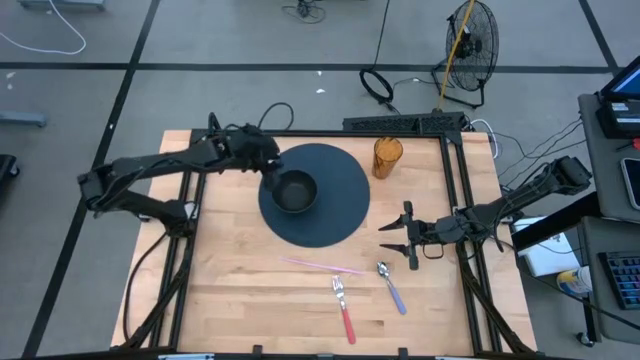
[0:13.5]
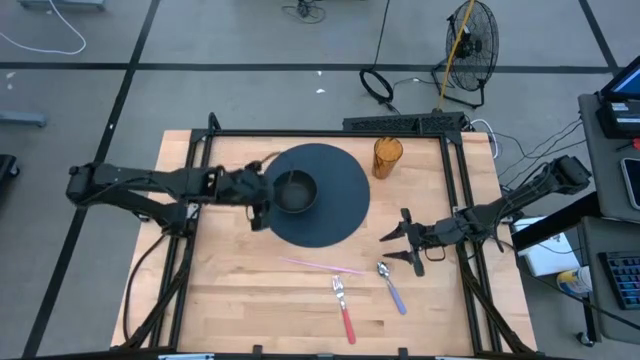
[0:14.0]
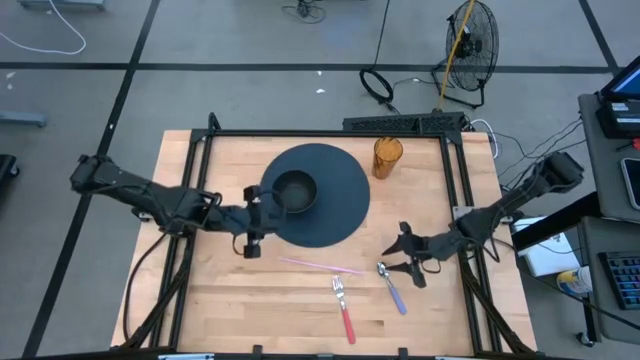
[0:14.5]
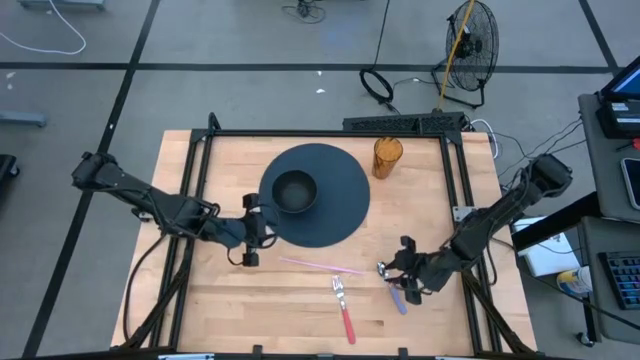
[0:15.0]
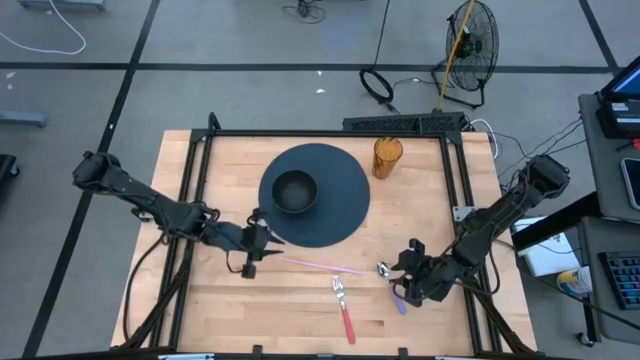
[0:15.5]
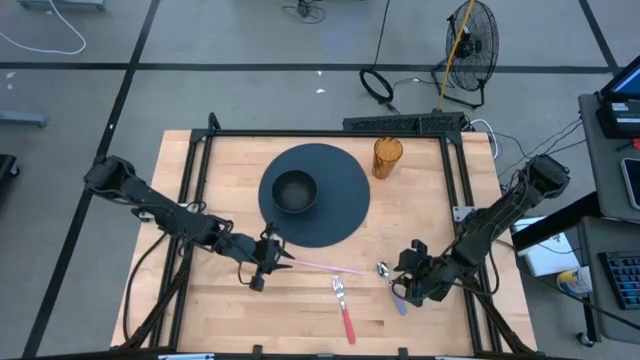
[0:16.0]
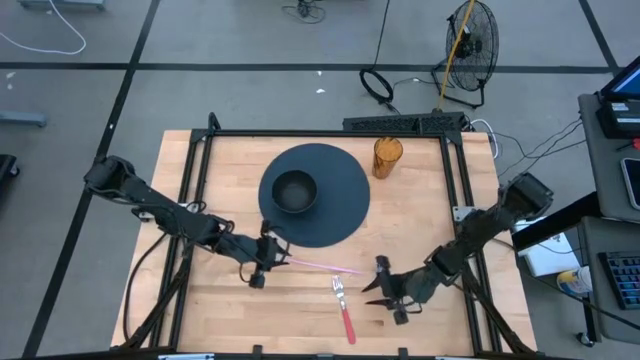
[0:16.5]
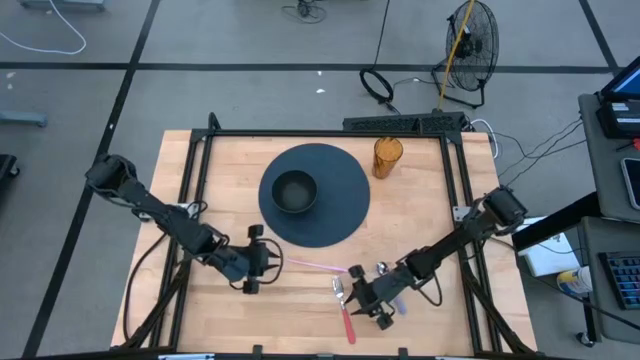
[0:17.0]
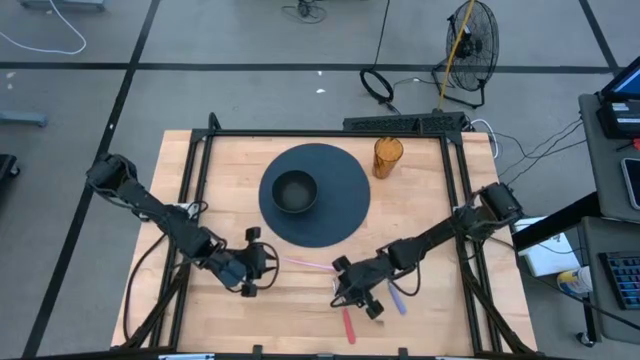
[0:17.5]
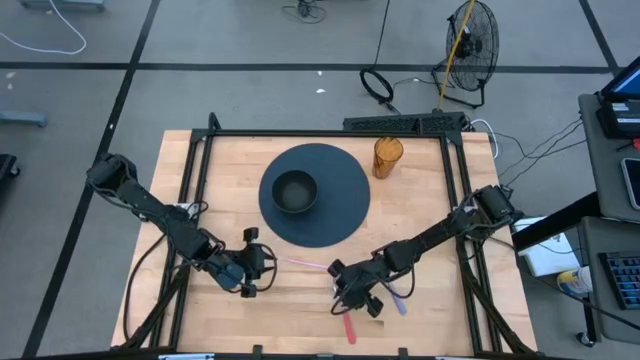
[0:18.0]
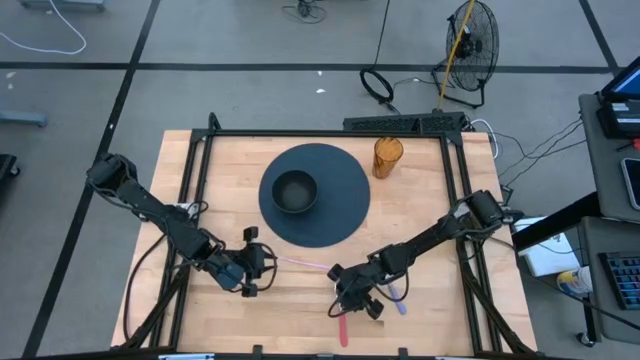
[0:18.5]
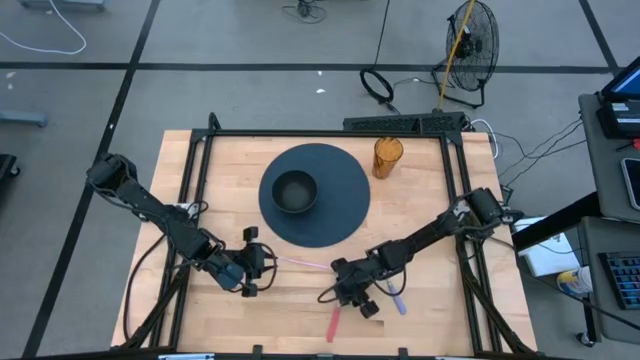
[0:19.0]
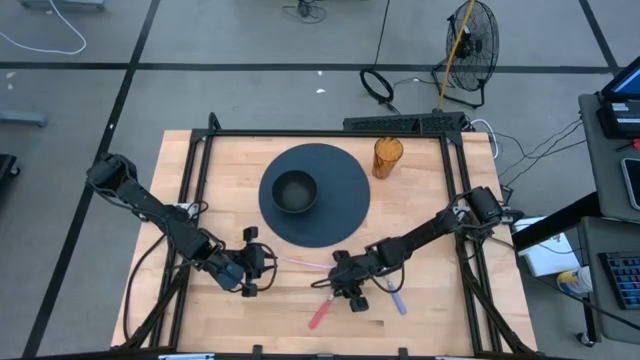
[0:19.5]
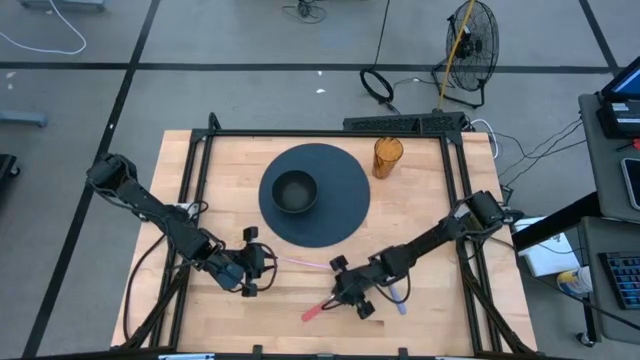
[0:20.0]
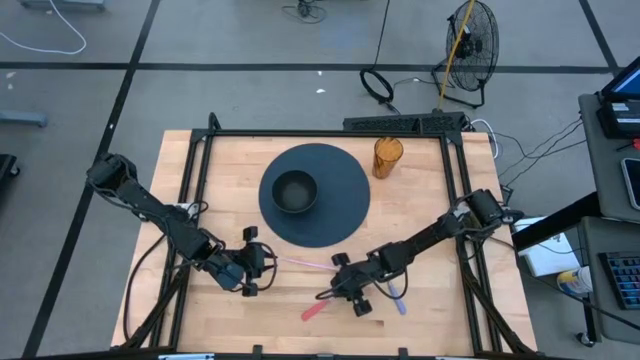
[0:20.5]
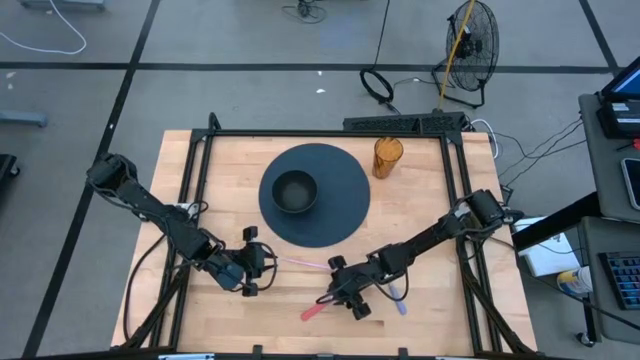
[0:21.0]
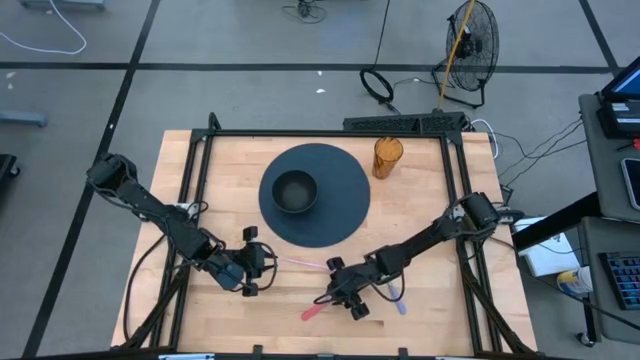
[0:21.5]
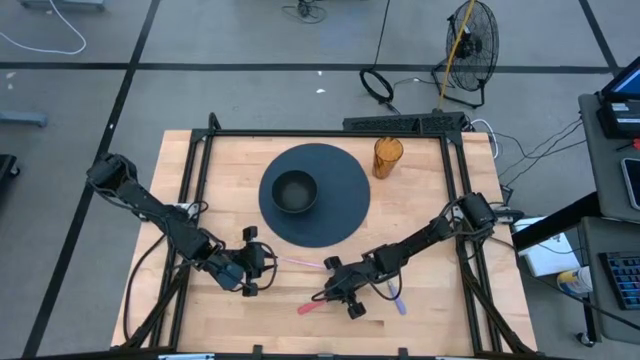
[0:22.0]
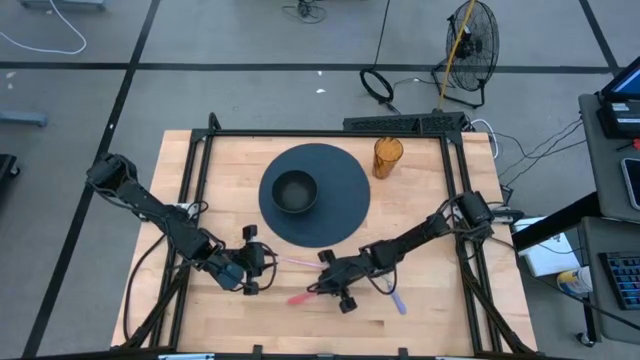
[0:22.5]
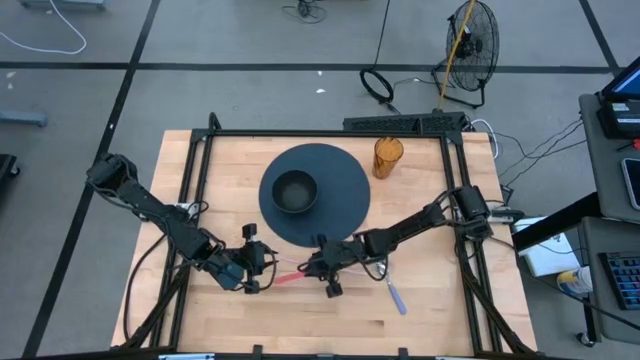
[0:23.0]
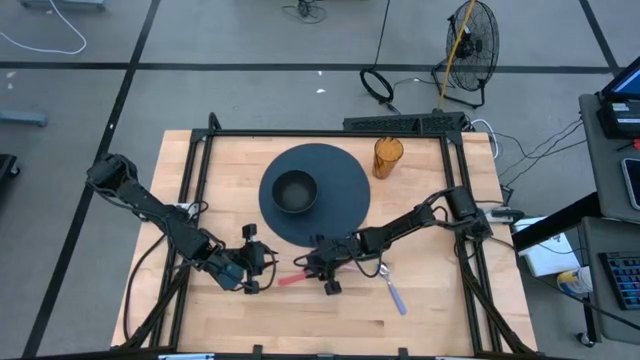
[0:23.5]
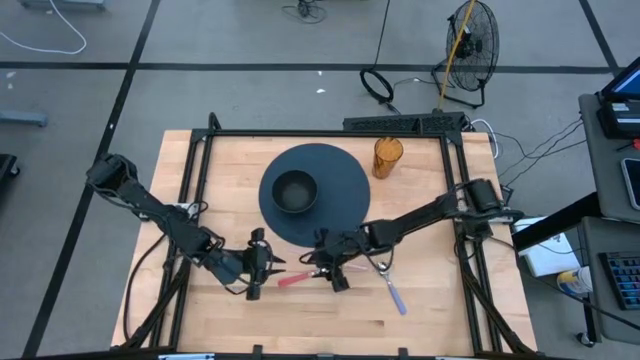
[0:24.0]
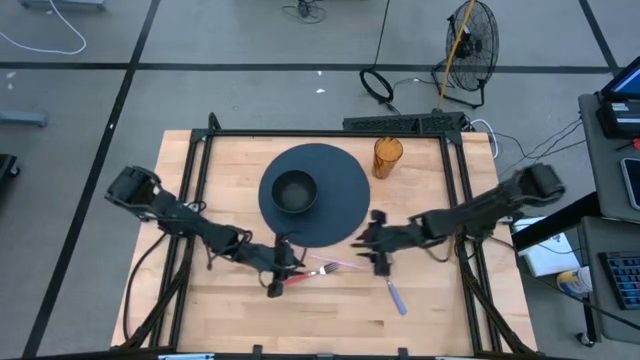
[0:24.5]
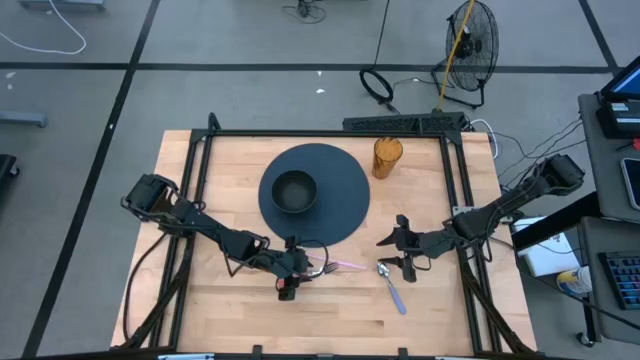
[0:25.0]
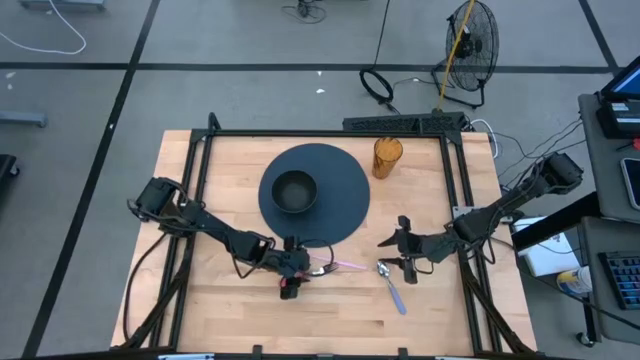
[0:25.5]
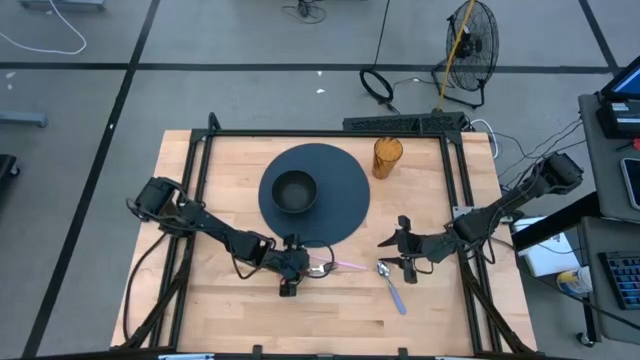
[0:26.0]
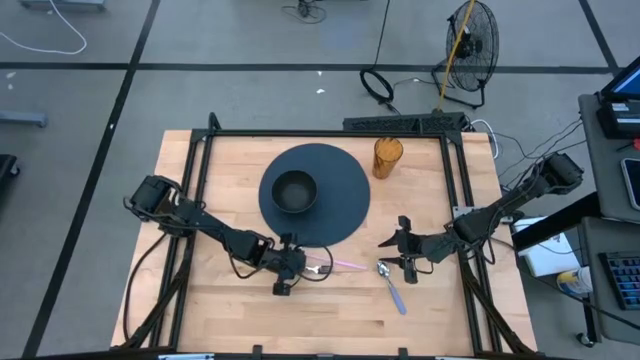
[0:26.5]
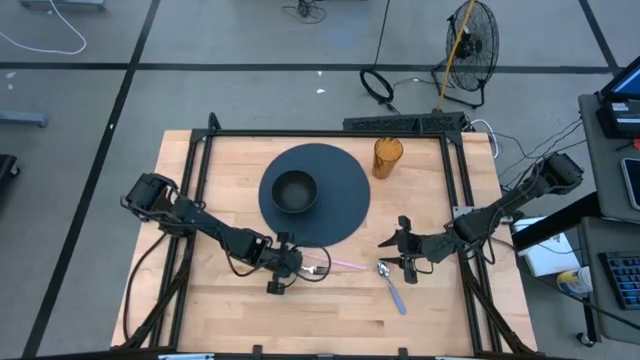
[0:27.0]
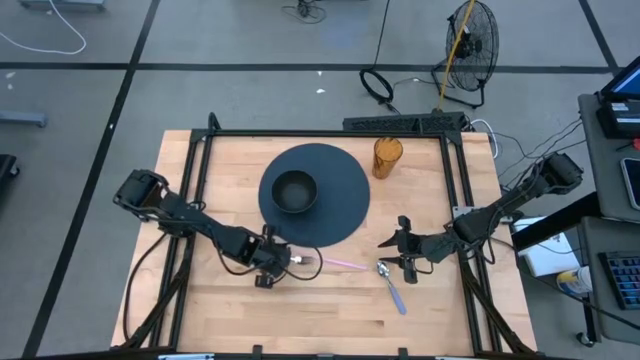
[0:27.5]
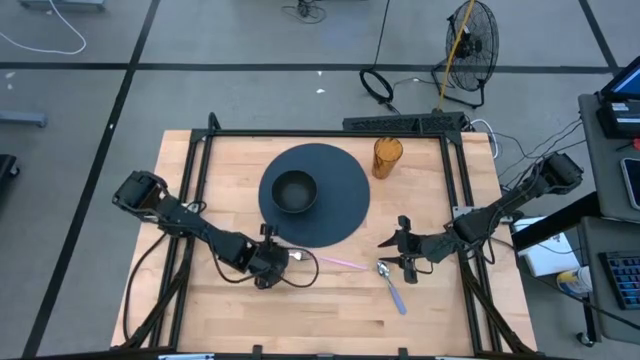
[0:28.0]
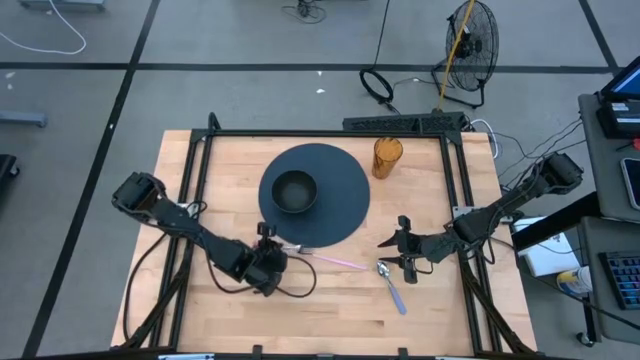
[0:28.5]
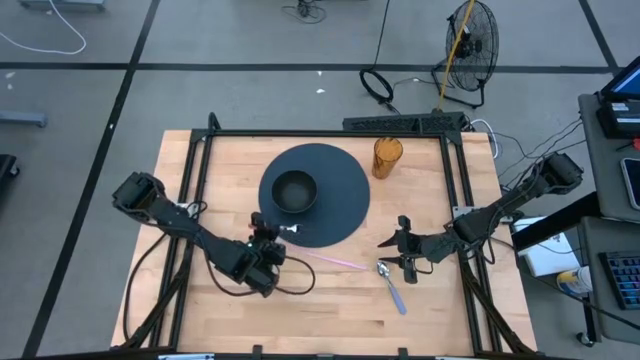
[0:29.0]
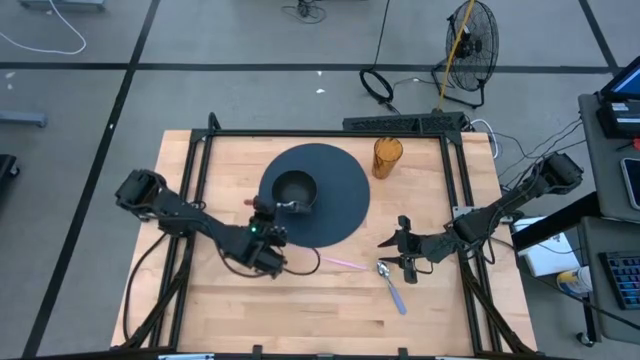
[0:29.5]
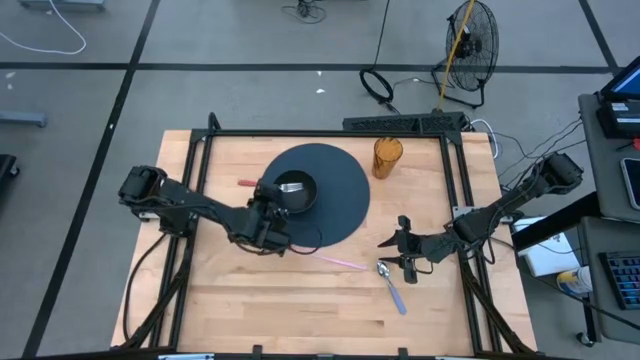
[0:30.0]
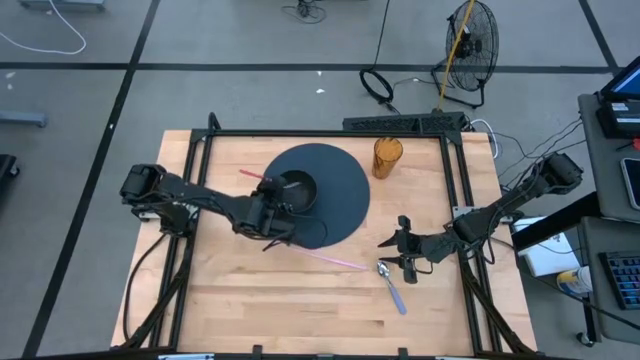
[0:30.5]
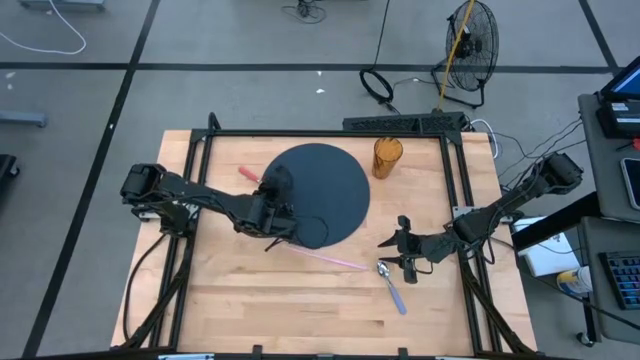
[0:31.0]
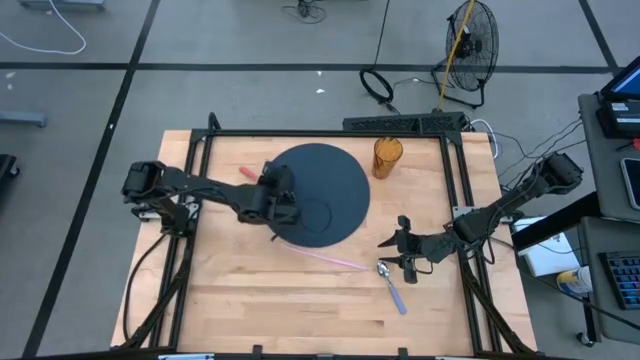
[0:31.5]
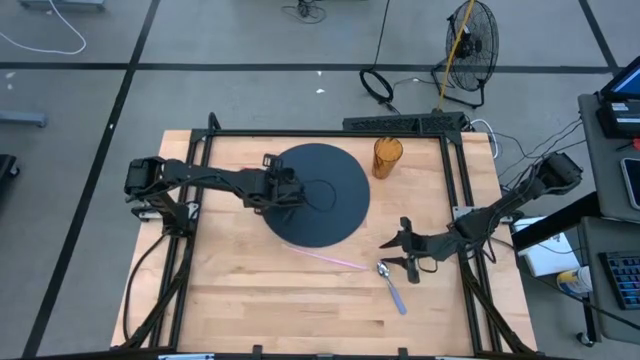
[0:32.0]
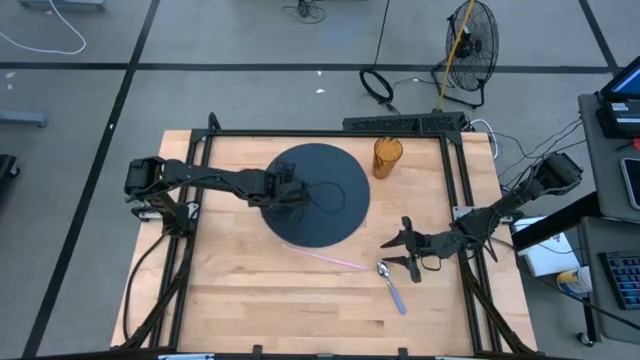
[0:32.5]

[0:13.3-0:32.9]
Task: Pick & Place Utensil
Put the pink fork into the black bowl
